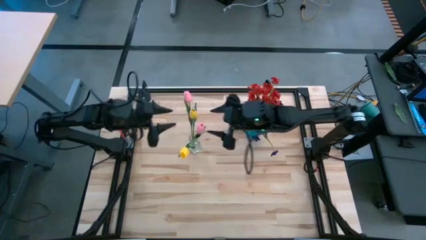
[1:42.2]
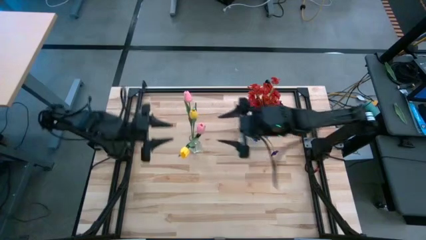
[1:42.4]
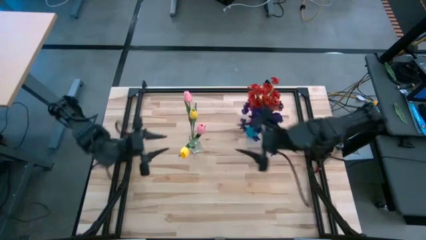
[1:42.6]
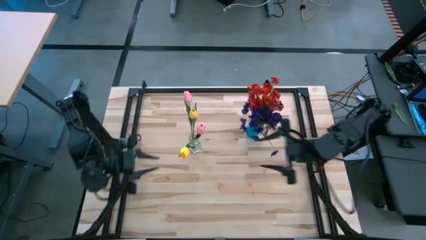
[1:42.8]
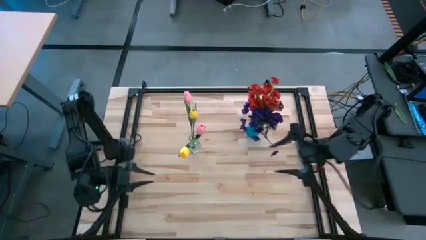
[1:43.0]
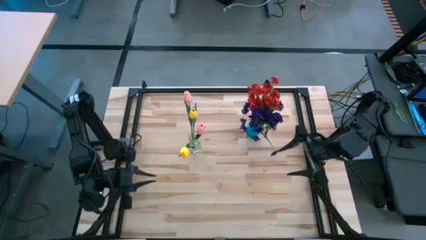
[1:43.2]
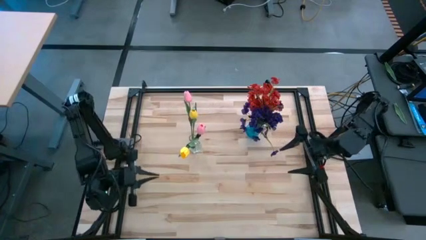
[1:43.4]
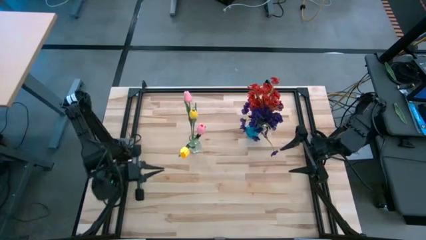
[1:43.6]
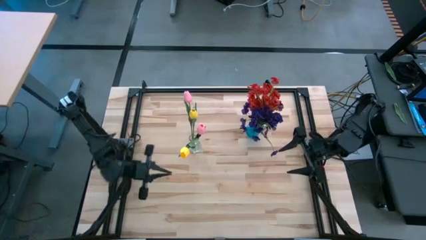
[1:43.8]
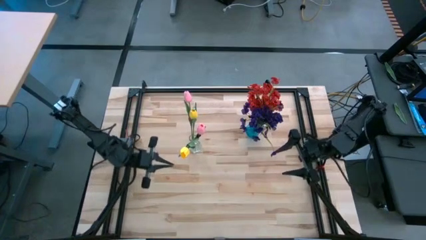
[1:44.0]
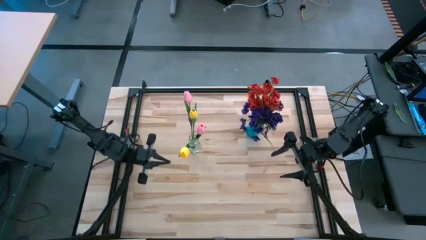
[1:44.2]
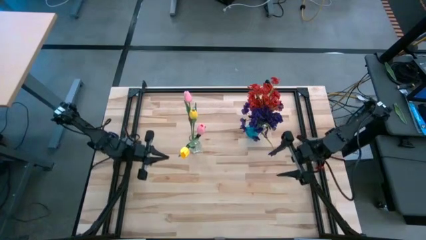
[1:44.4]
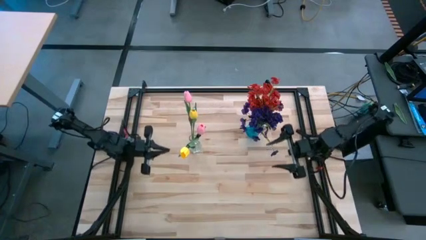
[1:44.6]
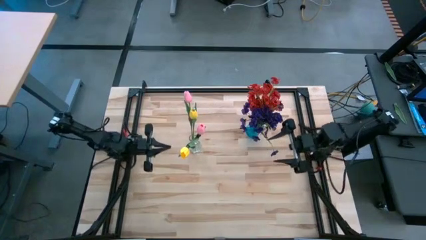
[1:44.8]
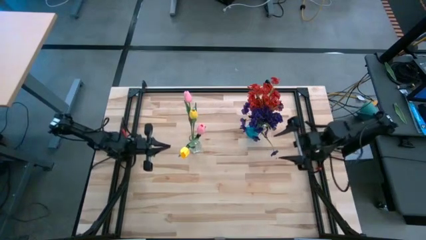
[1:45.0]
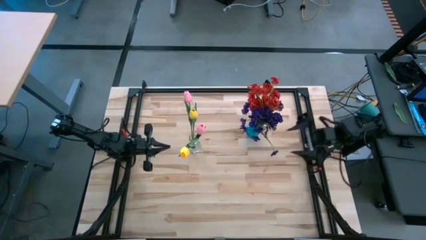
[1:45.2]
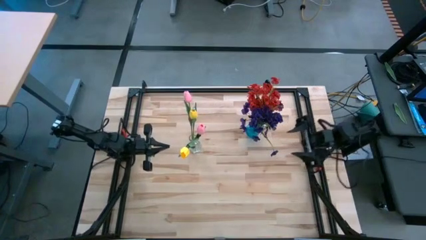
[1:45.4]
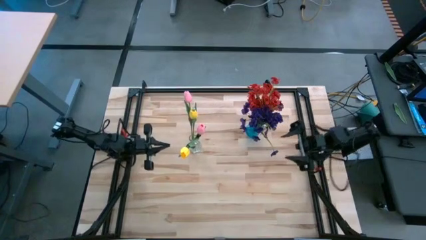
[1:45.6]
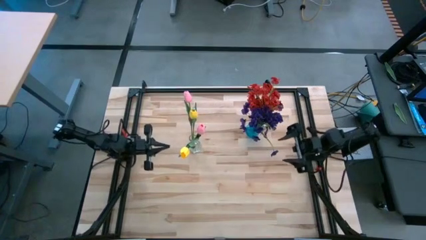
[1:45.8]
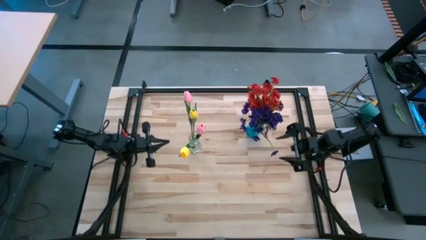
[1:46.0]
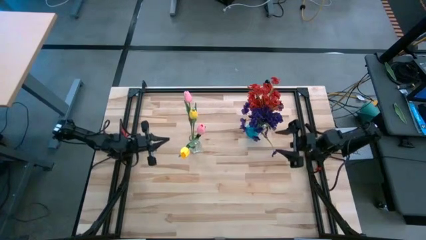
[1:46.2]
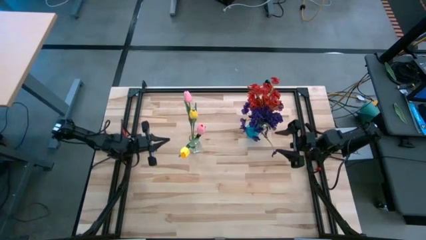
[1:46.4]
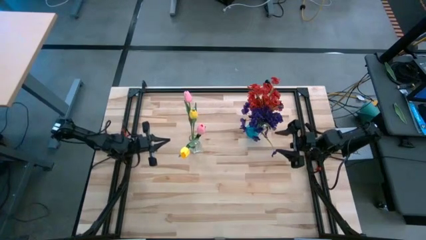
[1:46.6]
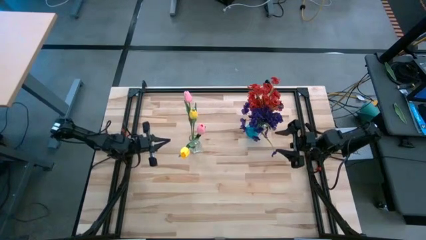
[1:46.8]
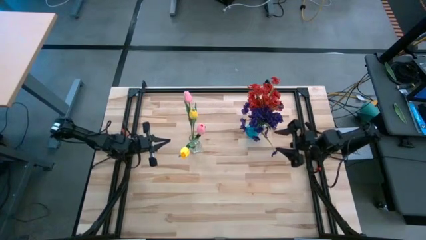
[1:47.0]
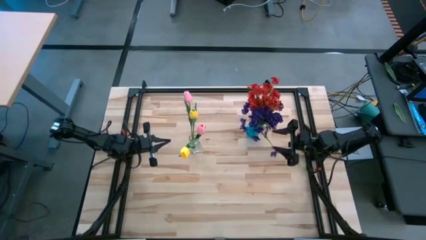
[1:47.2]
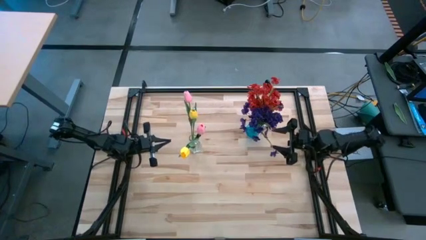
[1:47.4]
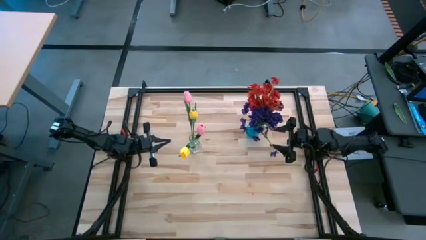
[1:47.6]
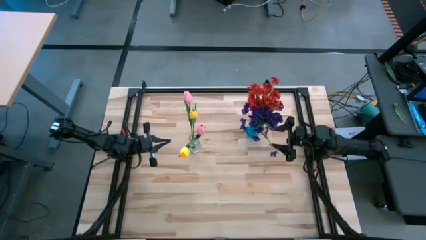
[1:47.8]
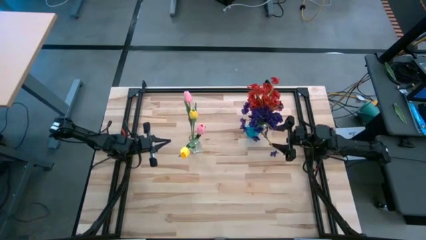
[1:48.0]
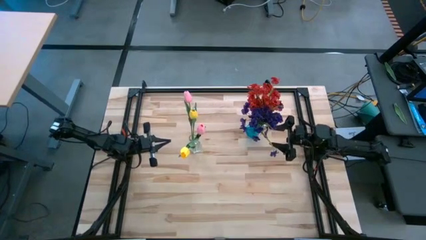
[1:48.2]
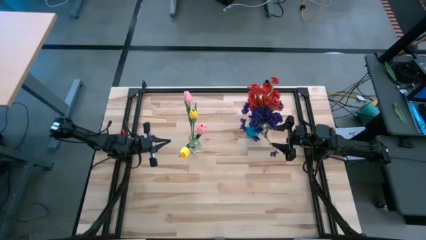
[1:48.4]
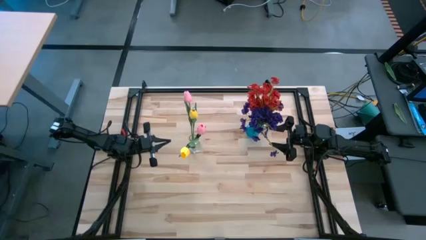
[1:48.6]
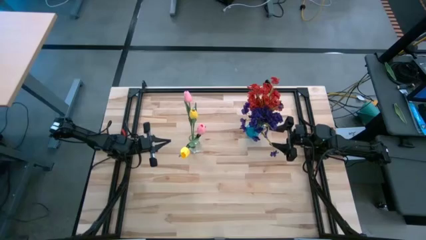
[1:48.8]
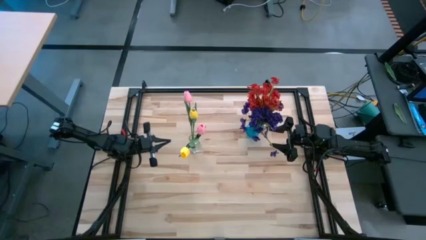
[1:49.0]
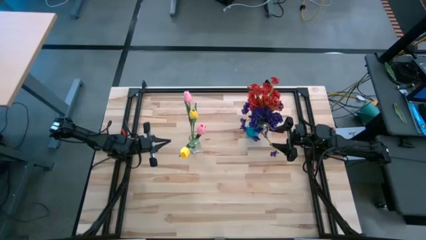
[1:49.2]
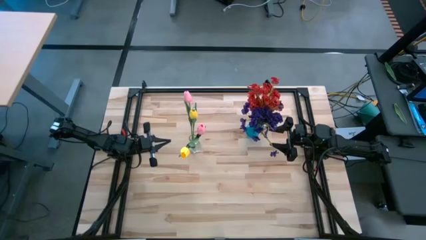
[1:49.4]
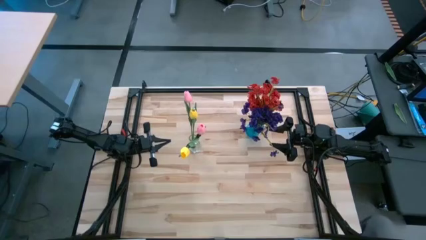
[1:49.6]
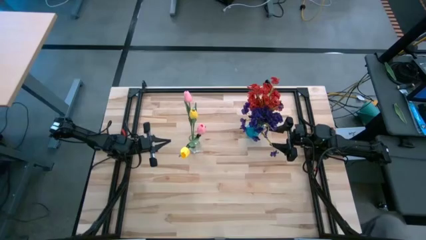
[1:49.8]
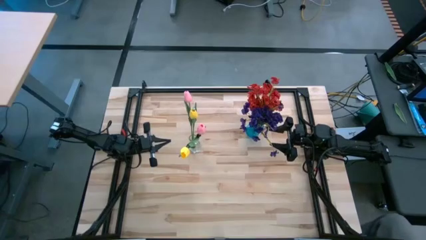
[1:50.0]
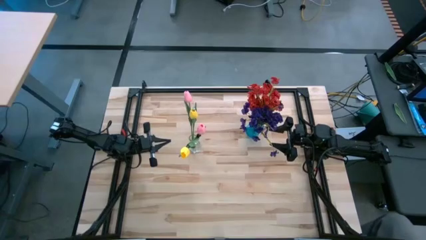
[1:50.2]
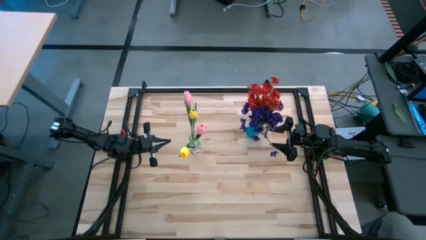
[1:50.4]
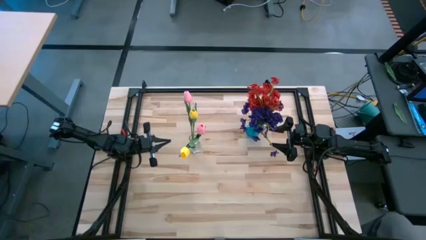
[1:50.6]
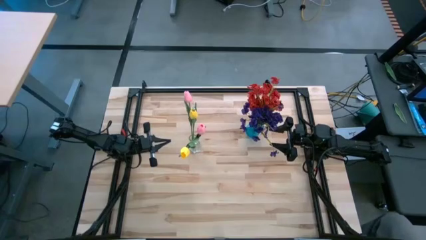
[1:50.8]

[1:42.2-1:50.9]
Task: Sort flowers into vase by color
Return to Home Position

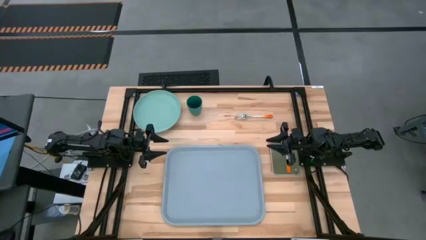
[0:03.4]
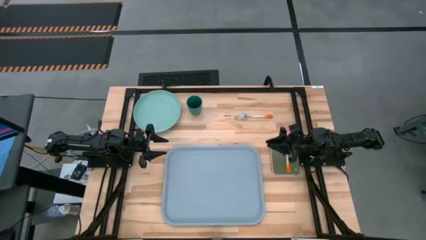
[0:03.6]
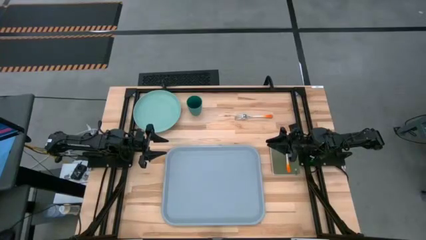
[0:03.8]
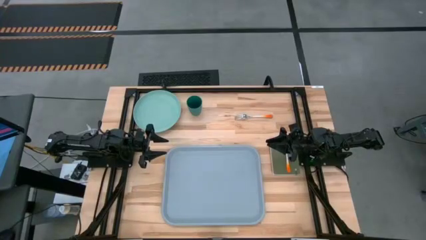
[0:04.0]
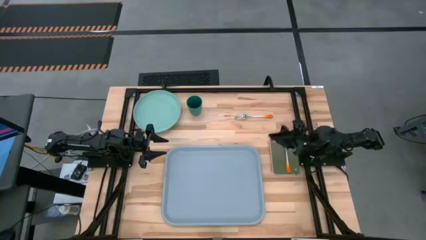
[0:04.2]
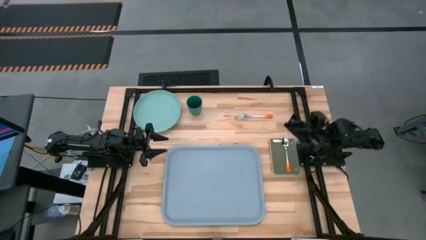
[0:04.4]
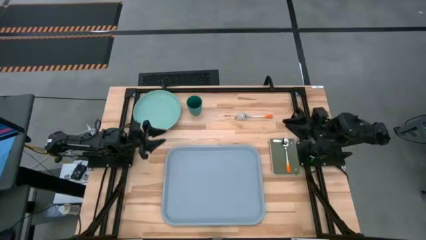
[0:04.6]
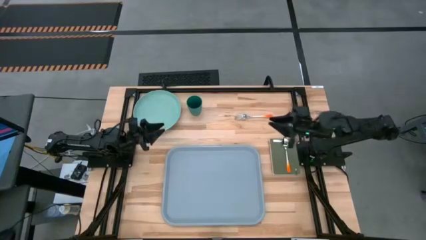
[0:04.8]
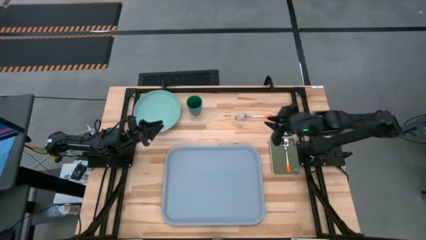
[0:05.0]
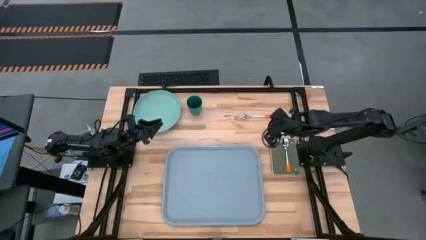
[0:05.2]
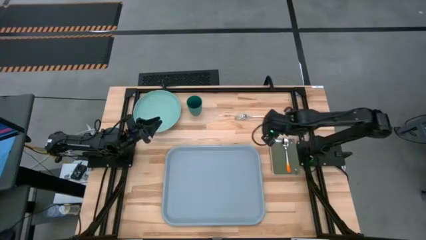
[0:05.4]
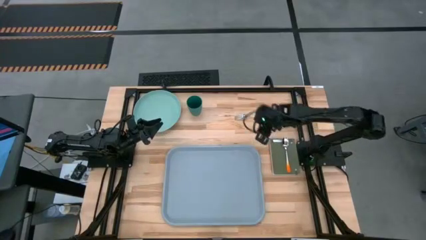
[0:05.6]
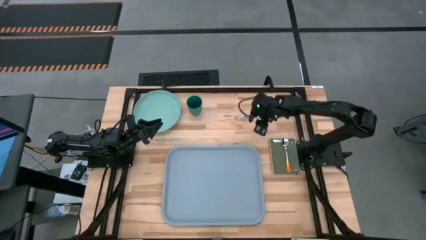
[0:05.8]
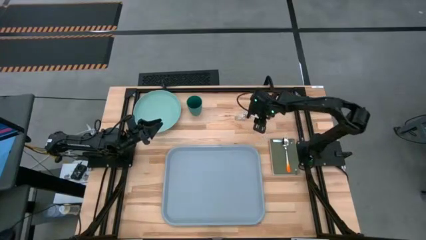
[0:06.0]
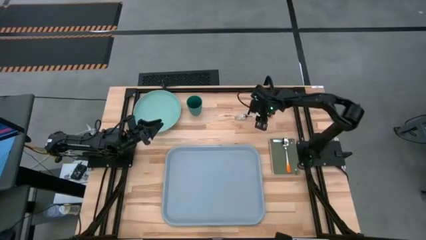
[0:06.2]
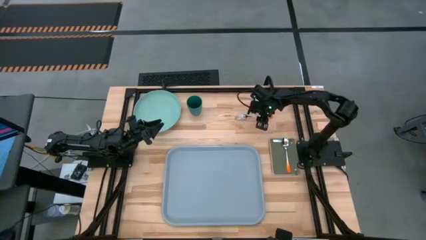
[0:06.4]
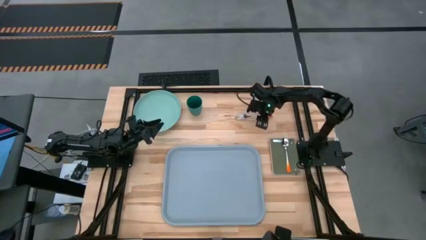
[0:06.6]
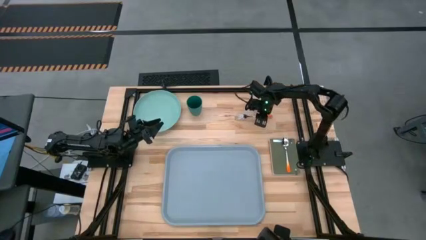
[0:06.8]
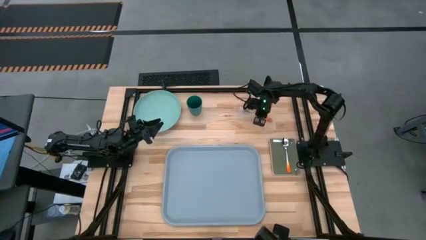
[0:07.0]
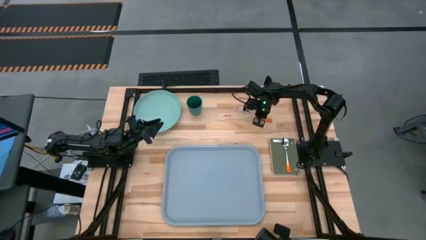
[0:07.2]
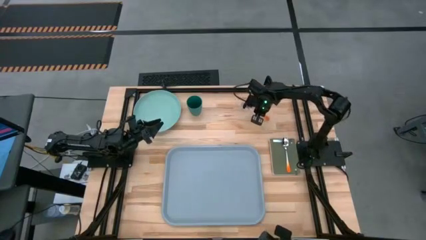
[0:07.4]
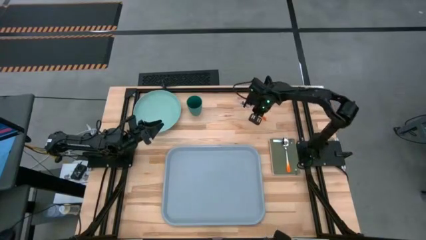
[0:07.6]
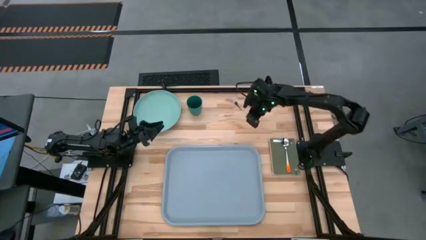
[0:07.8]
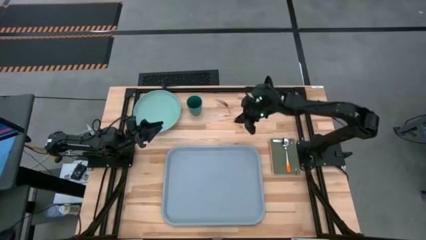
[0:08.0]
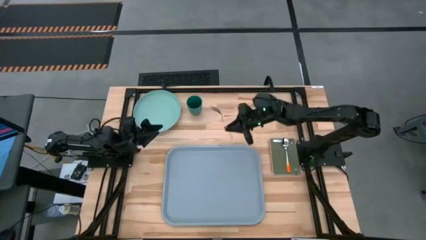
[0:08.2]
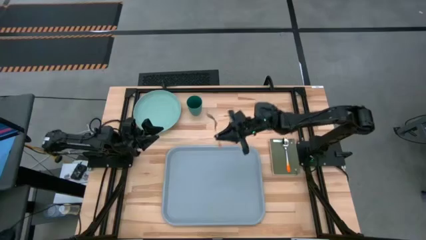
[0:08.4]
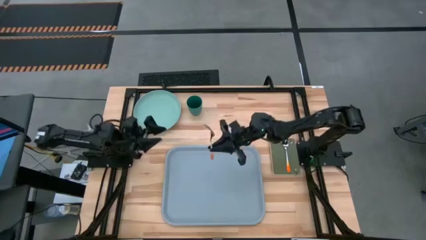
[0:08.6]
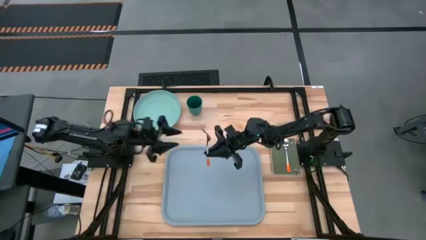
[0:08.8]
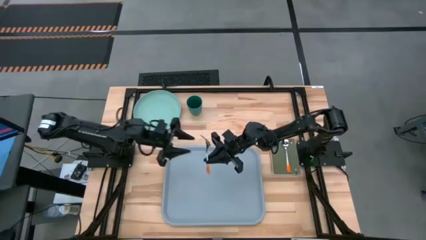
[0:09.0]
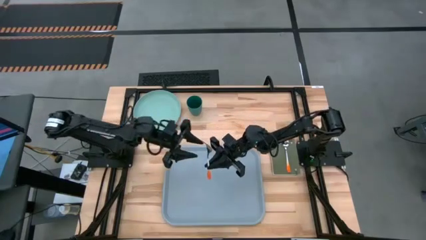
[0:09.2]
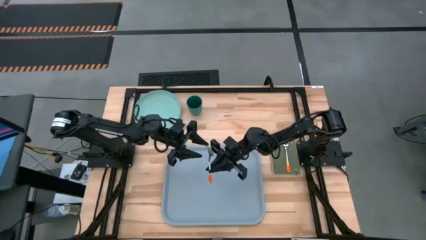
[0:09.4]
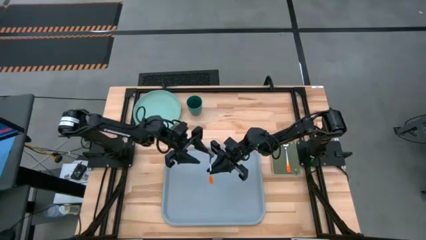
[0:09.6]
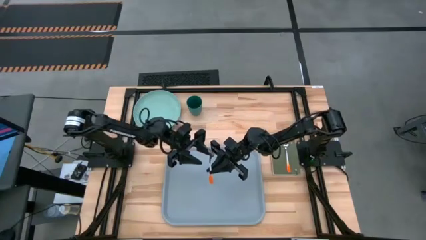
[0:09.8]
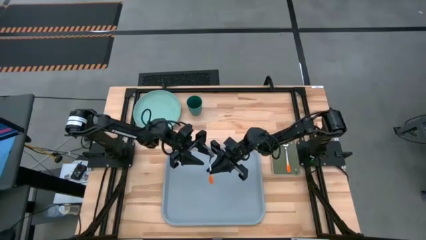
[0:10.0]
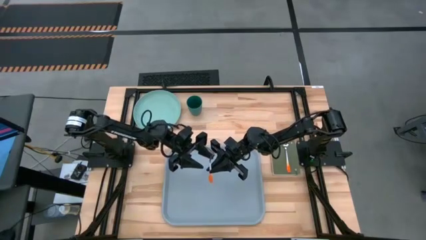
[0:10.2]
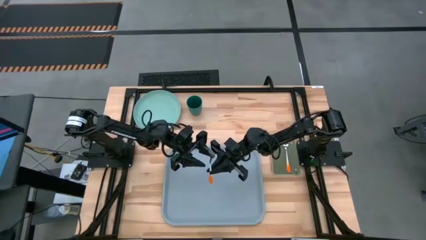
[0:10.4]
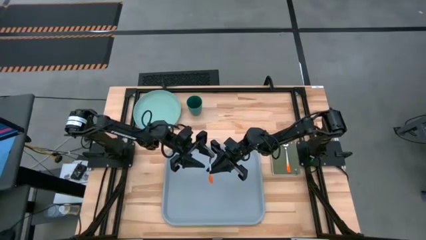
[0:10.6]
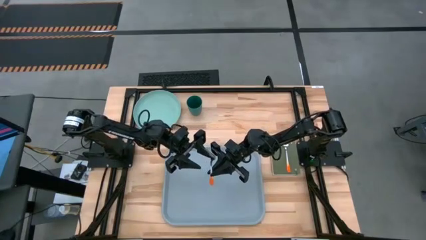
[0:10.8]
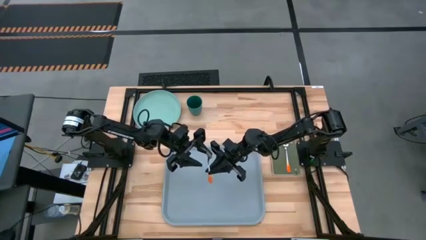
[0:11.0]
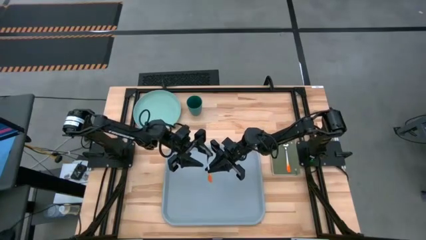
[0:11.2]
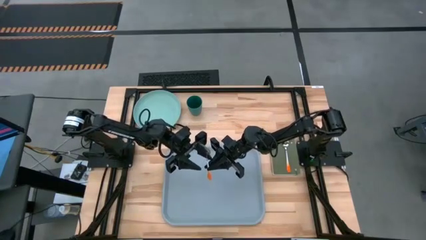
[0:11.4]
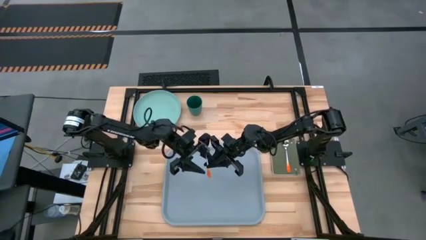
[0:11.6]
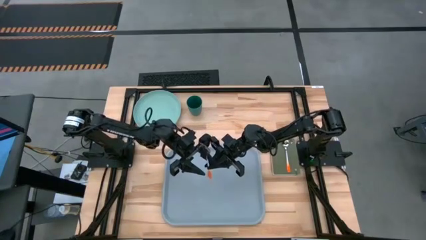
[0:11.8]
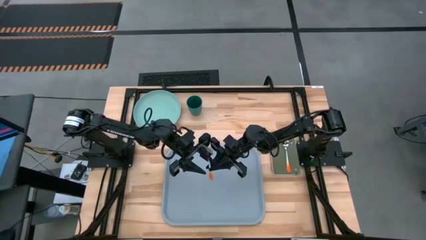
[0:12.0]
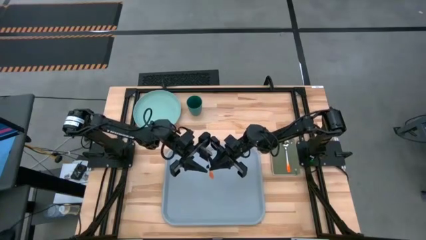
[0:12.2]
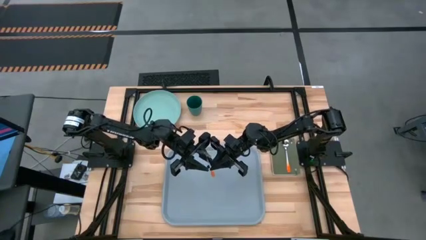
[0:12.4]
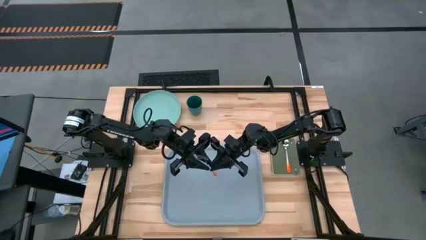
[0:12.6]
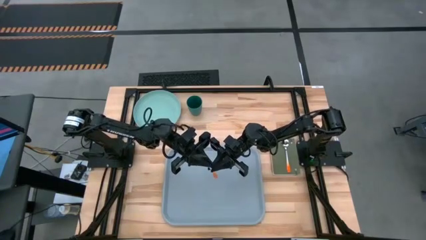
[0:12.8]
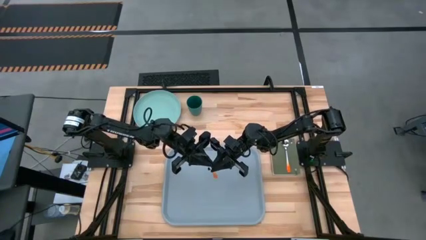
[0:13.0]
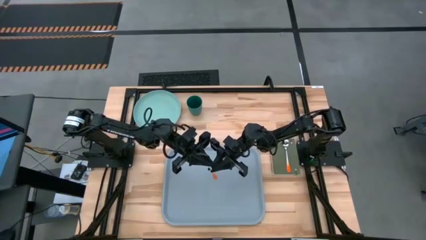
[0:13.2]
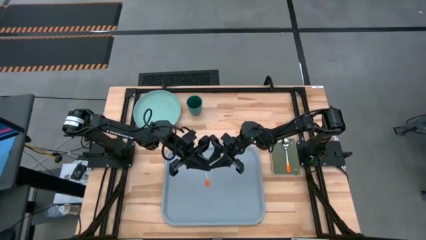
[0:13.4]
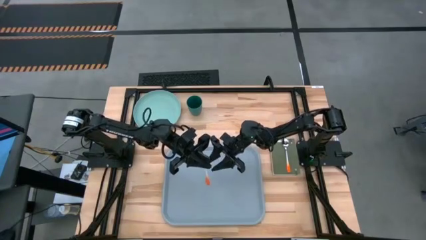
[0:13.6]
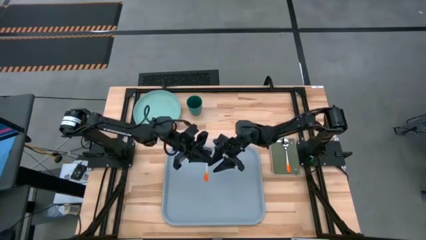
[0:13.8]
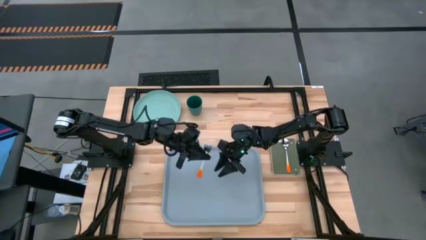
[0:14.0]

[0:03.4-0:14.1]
Task: Pick and place plate/cup/fork/spoon on tray
Put the orange fork on the blue serving tray
